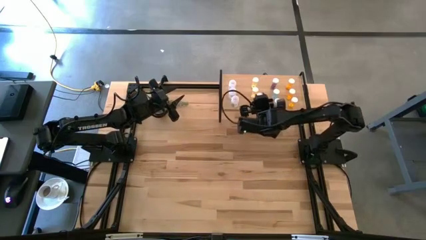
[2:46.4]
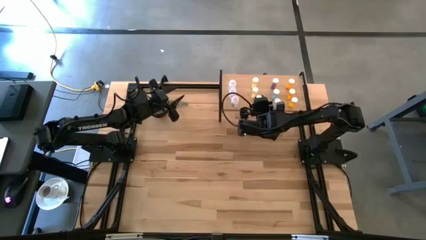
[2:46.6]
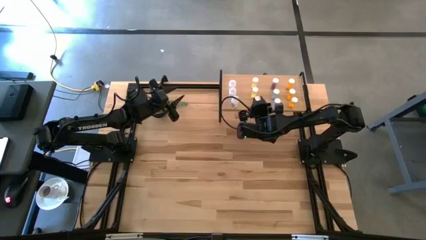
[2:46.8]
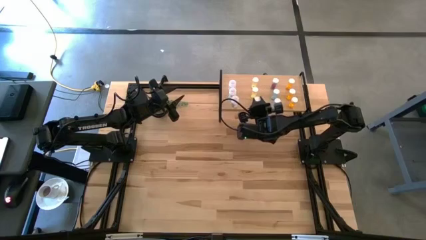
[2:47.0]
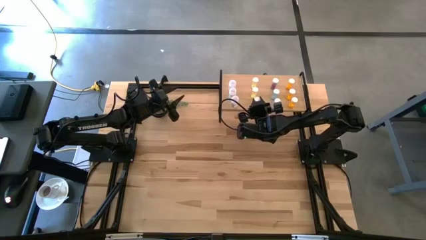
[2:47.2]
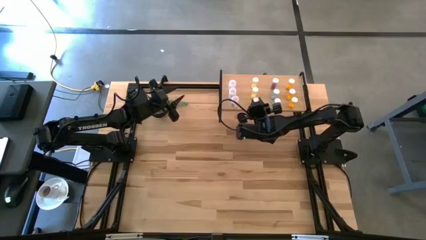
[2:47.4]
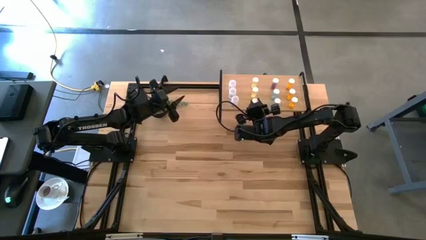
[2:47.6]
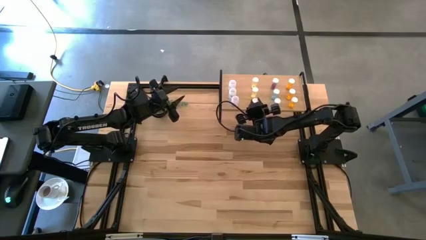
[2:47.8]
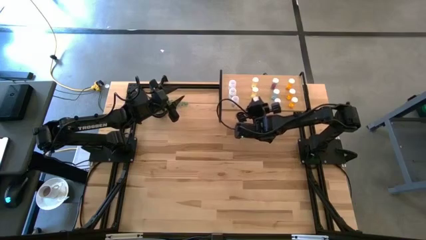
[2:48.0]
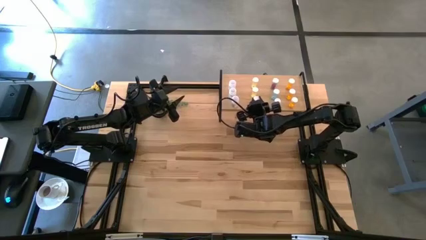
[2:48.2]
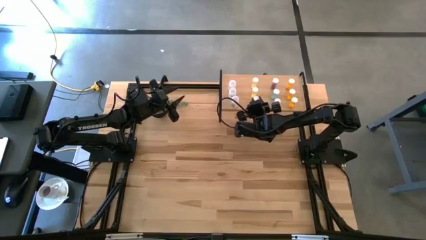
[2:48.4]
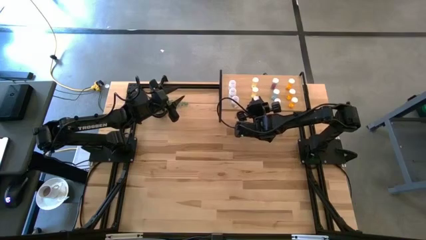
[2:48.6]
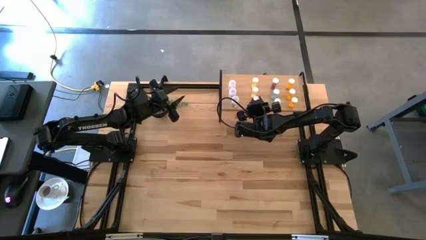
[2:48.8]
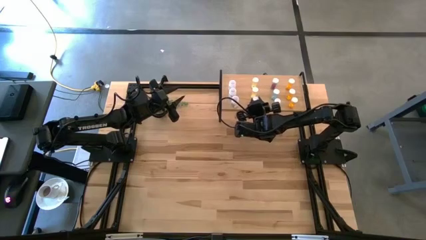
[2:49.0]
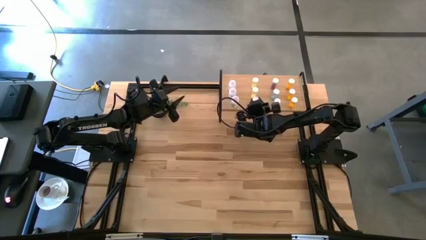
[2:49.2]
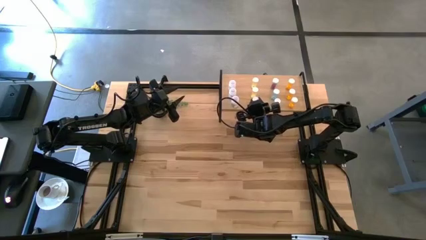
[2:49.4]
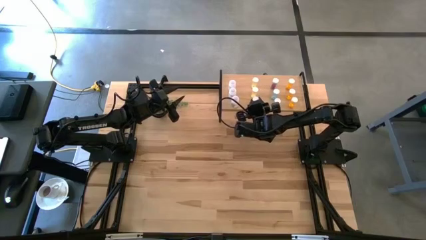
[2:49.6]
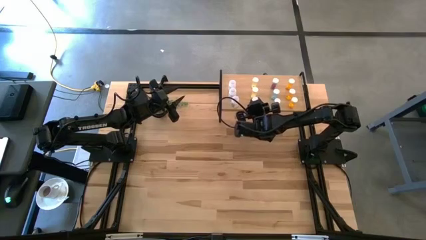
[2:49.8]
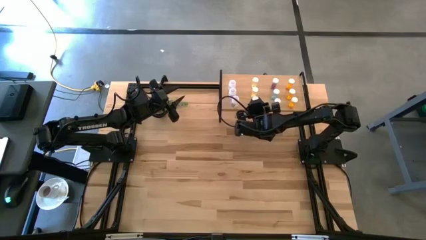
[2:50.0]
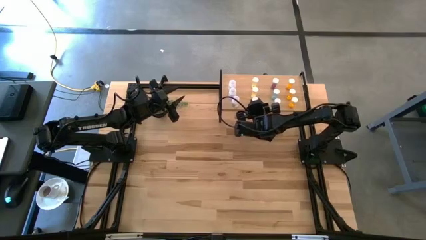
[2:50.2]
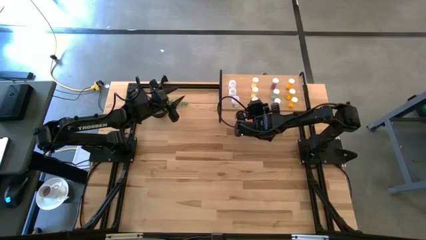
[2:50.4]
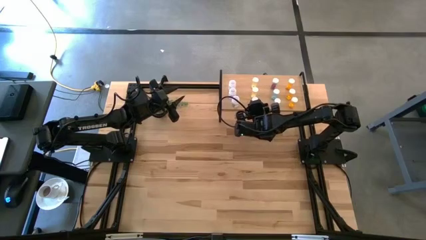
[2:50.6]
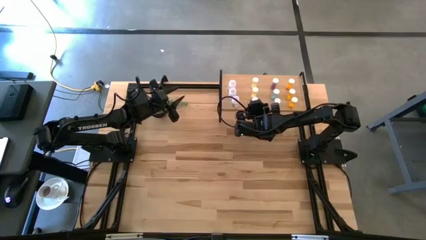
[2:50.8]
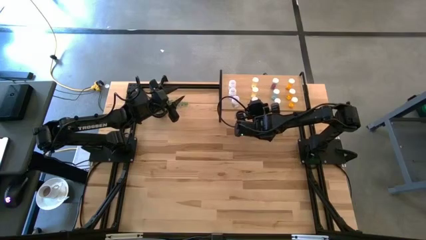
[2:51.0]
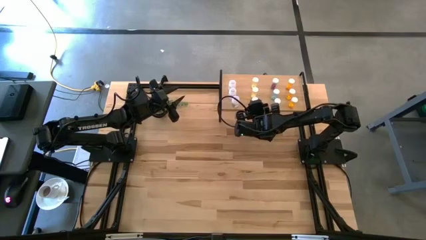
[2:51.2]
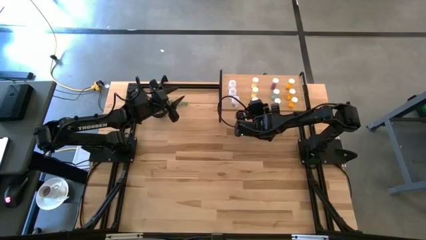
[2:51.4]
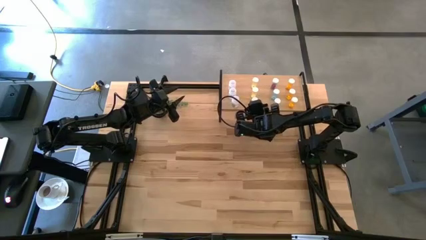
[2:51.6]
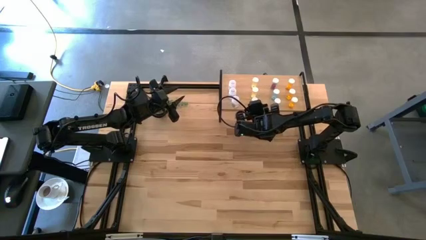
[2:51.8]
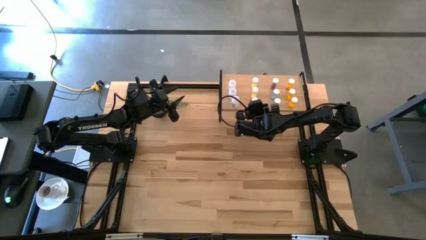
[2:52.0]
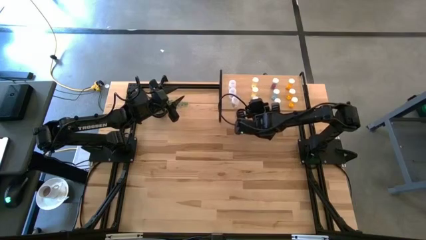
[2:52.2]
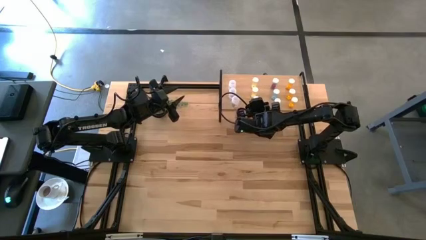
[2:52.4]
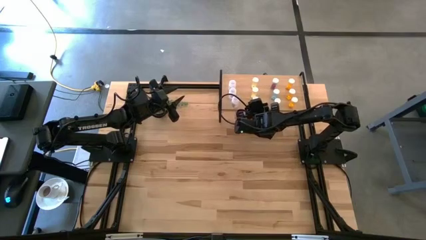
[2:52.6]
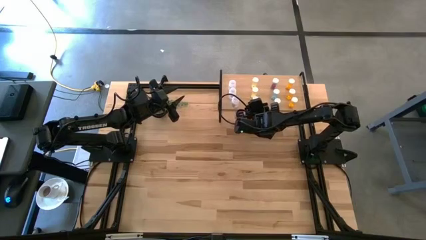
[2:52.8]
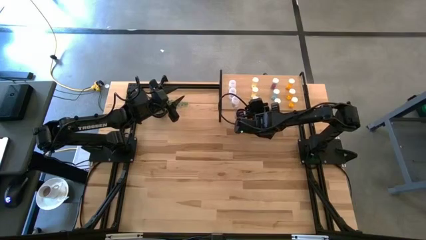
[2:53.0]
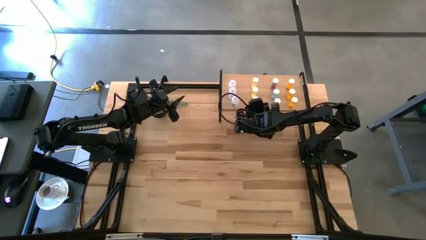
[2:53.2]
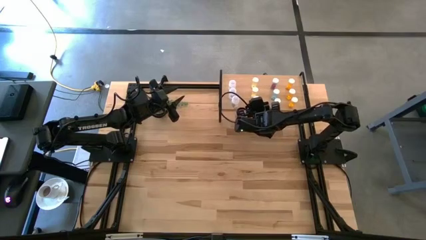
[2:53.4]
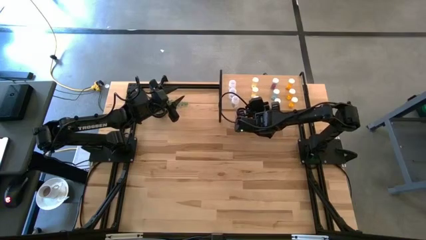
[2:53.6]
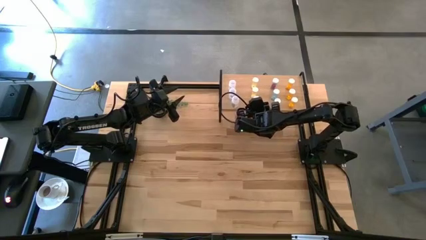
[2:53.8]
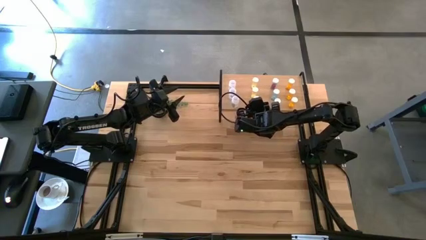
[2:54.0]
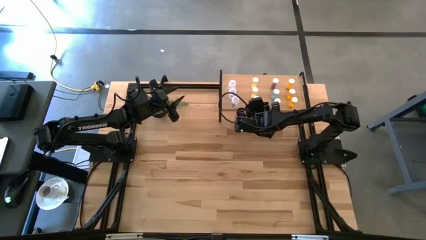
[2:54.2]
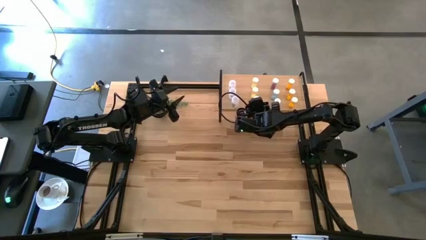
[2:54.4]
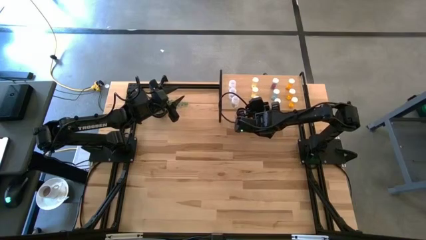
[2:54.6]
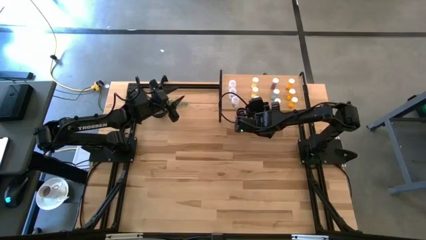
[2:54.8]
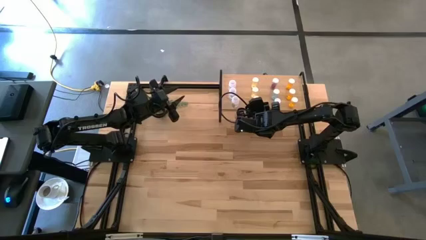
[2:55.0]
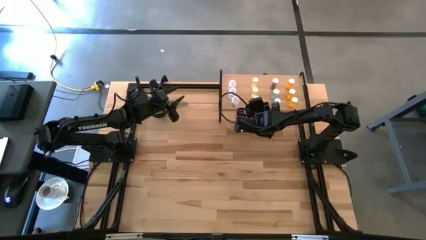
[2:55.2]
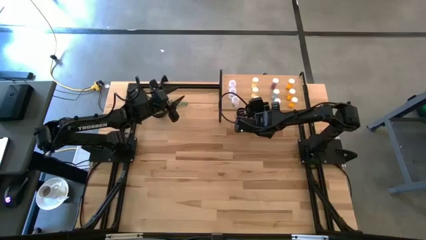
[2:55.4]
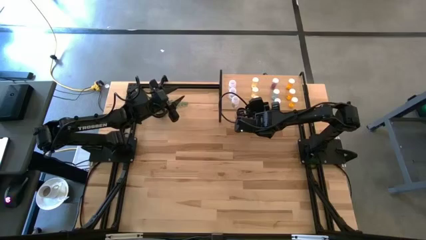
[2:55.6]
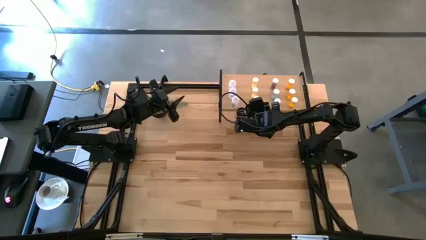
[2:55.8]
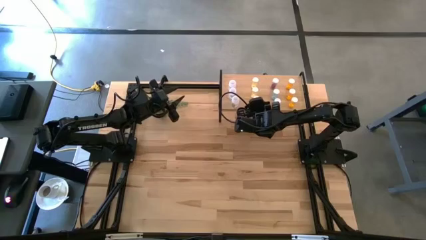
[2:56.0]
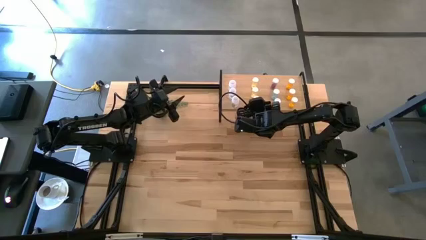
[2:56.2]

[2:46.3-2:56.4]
Task: Pick and place medicine bottles onto shelf by color
Put the yellow pill bottle aligned with the other yellow pill bottles on the shelf

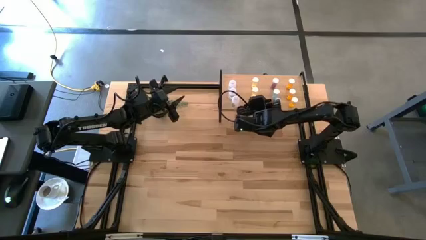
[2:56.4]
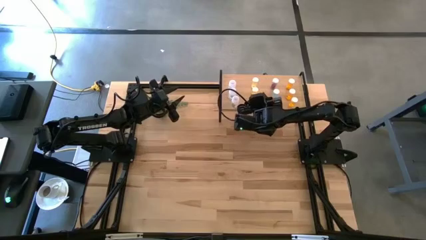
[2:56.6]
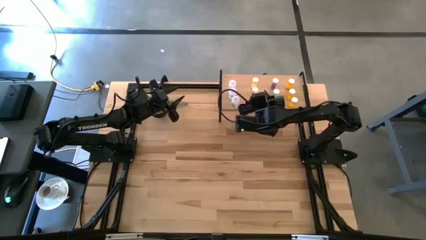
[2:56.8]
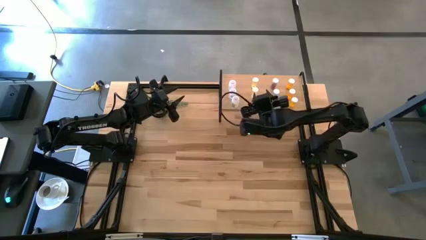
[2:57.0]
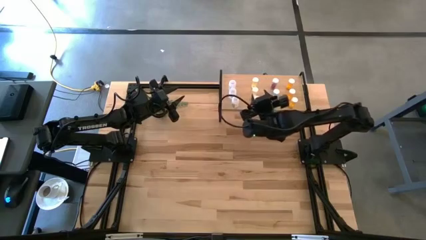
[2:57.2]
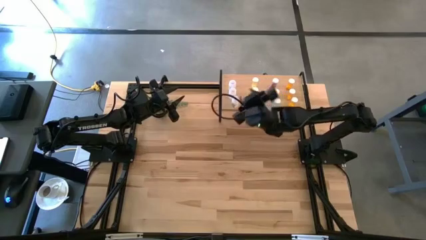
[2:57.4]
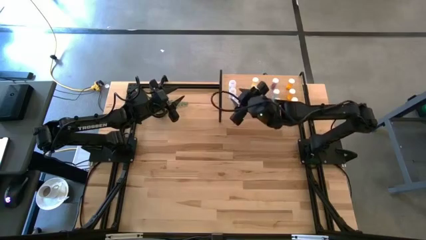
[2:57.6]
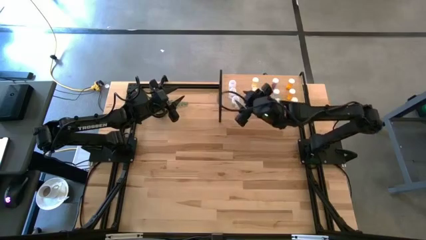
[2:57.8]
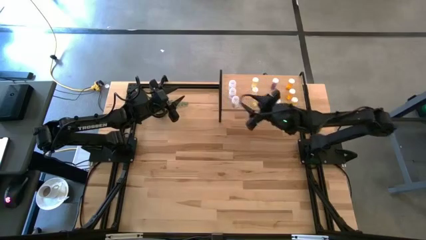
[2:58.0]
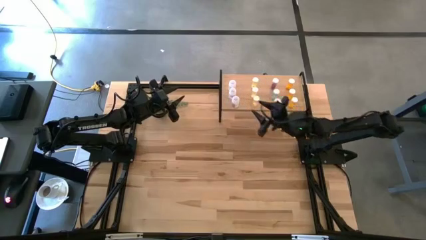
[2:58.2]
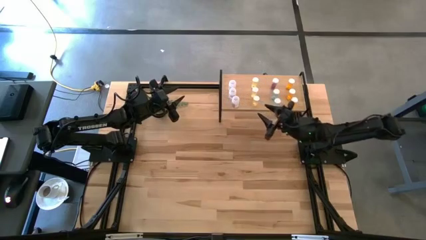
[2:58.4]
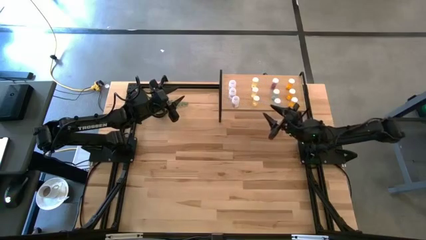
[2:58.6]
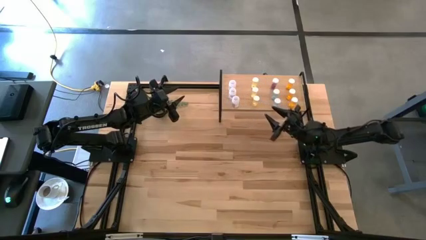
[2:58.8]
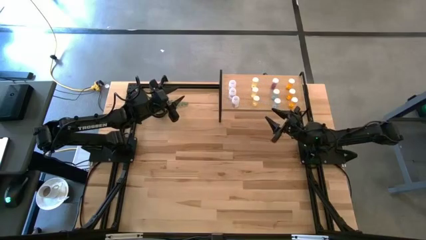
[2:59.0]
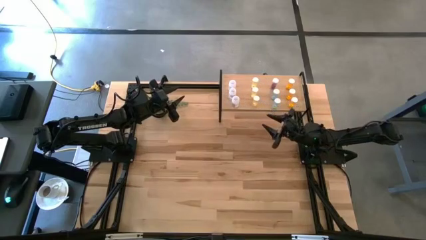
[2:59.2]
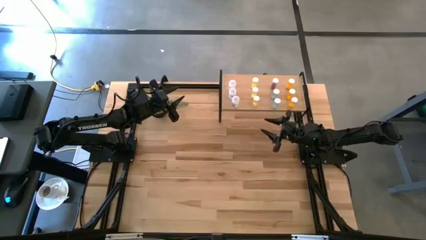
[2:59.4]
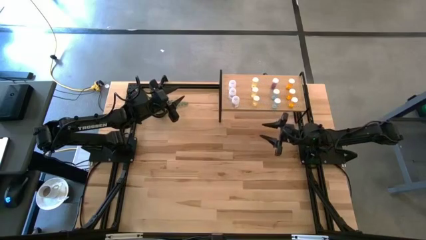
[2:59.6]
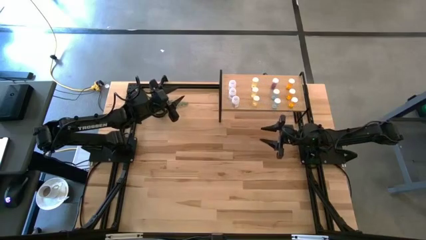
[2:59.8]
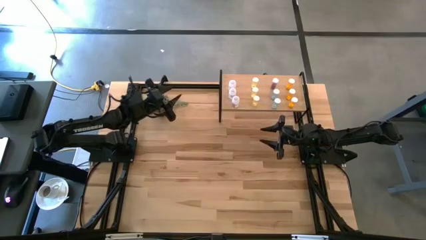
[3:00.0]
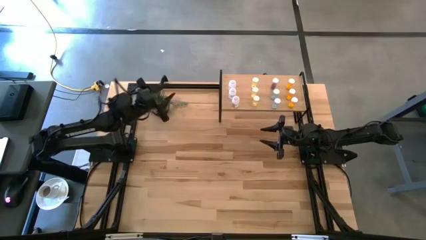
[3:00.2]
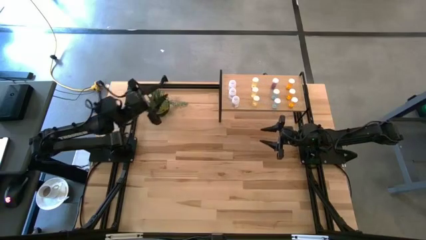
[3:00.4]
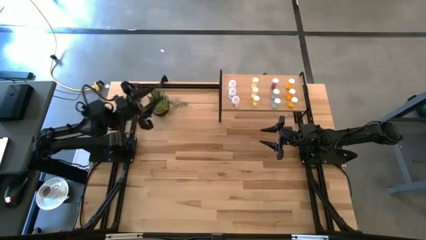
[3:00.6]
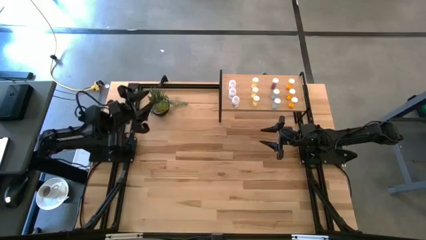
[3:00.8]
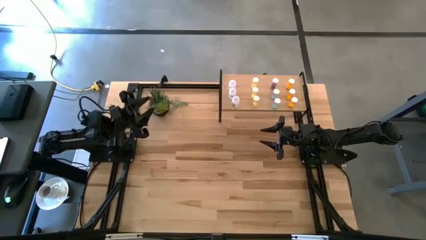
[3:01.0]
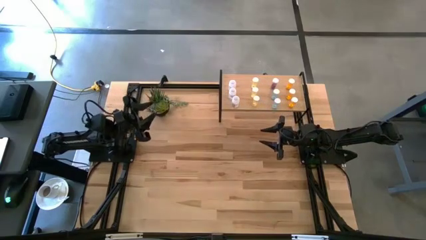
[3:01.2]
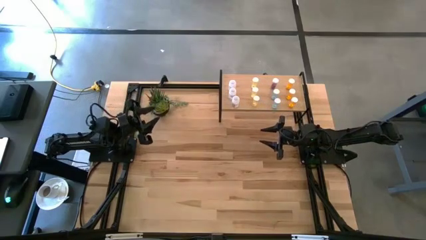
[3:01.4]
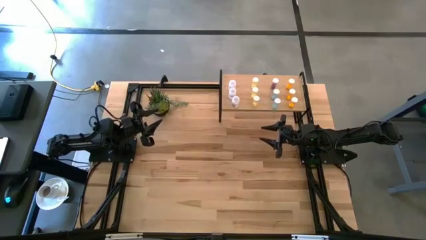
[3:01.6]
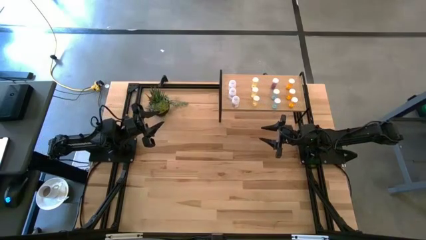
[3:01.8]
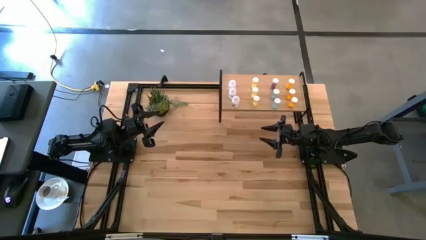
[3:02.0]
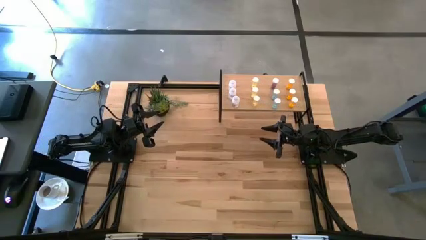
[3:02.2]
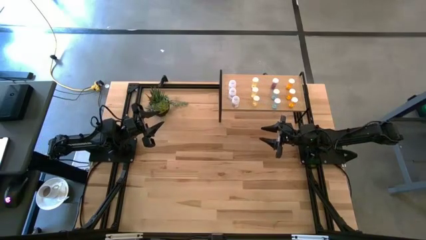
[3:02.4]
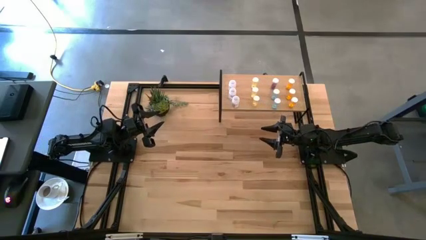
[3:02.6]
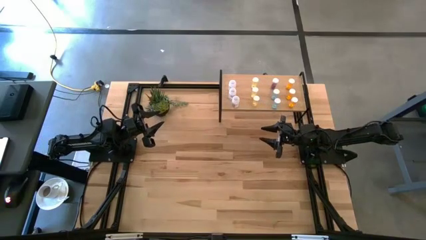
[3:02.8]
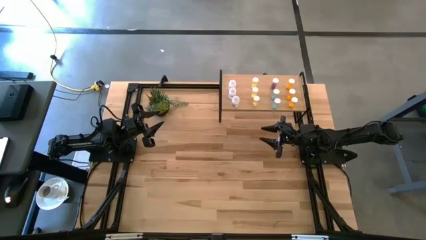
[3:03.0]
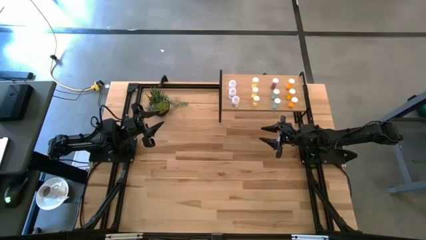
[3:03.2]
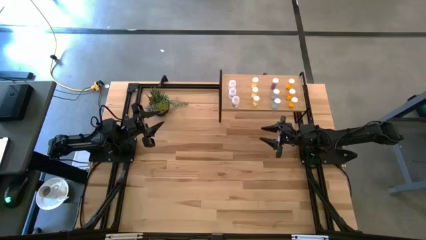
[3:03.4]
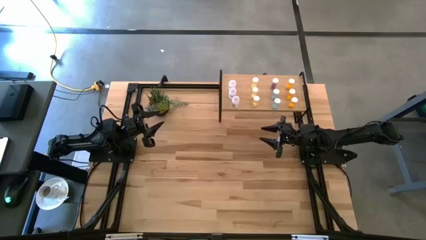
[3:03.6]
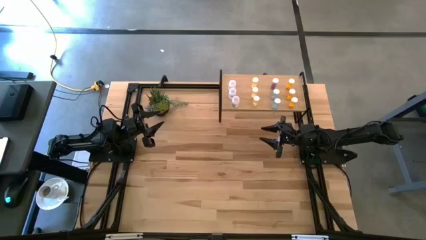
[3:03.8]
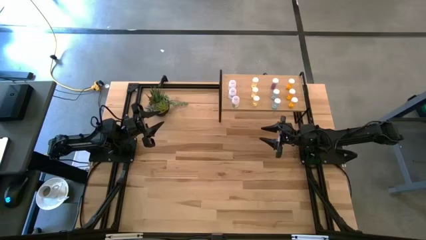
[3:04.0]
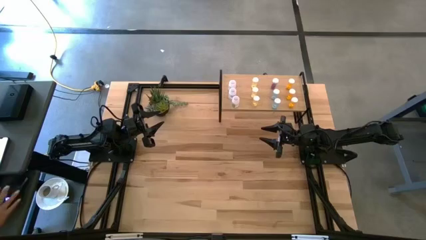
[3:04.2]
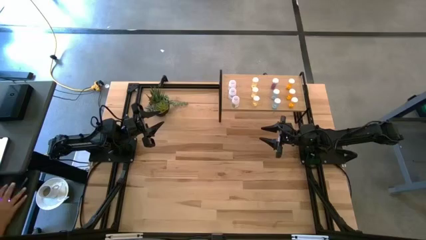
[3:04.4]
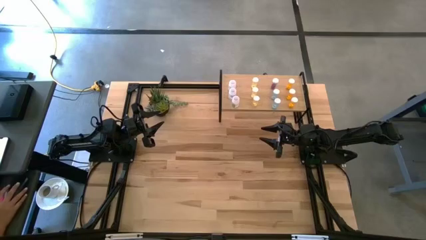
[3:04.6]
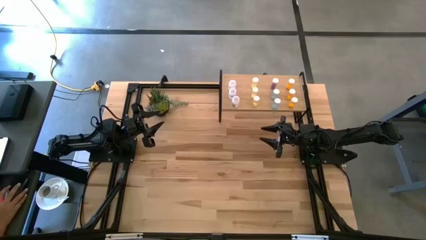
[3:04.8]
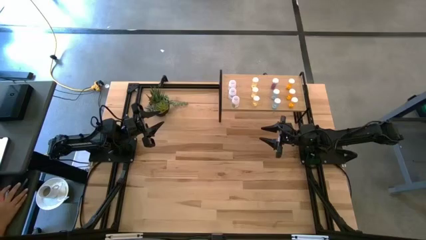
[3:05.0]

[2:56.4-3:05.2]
Return to Home Position
